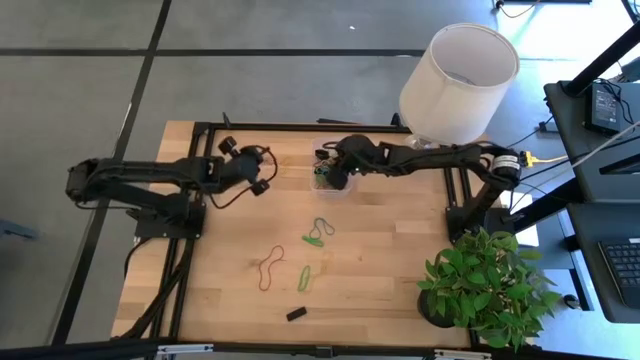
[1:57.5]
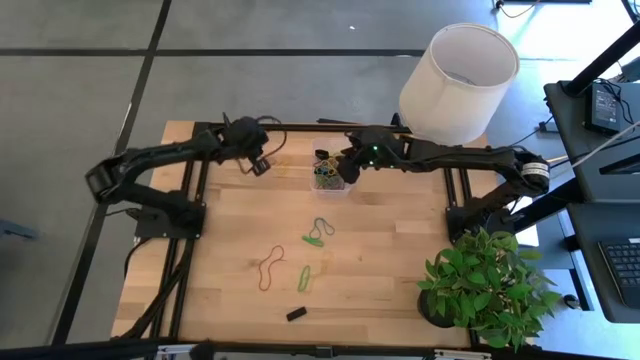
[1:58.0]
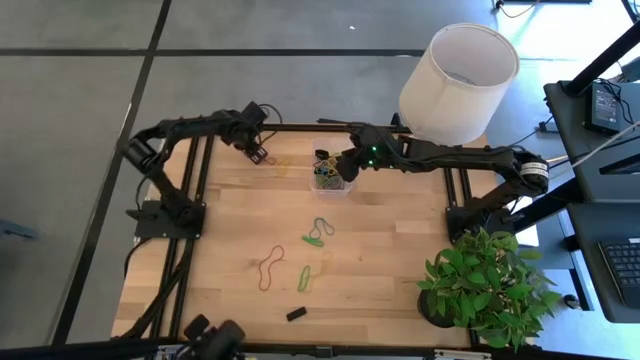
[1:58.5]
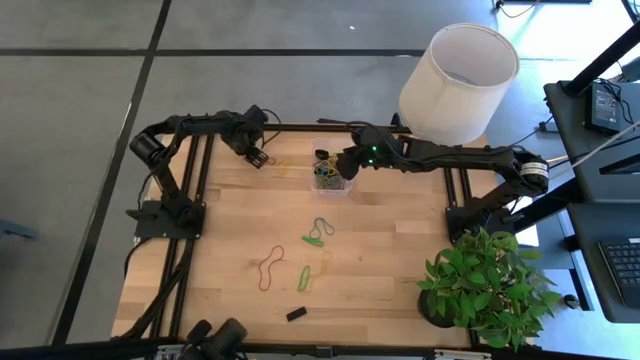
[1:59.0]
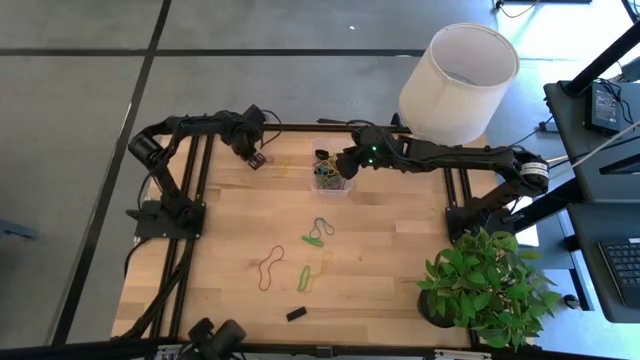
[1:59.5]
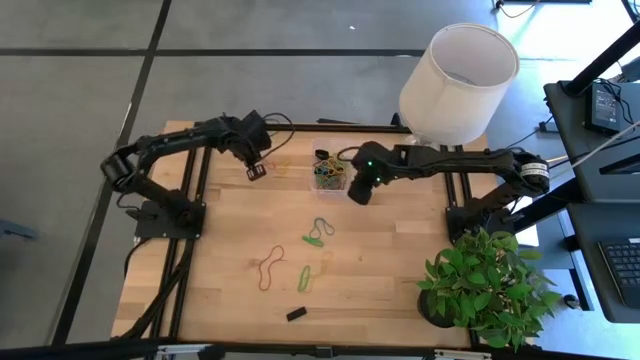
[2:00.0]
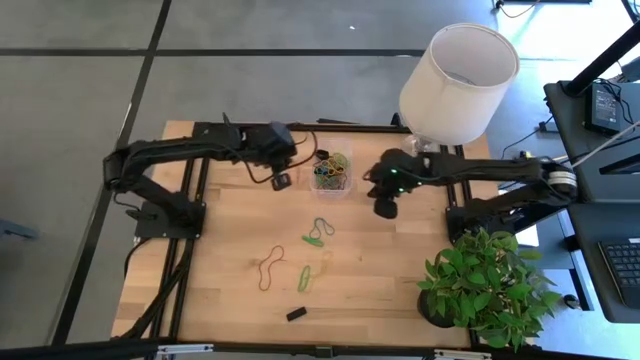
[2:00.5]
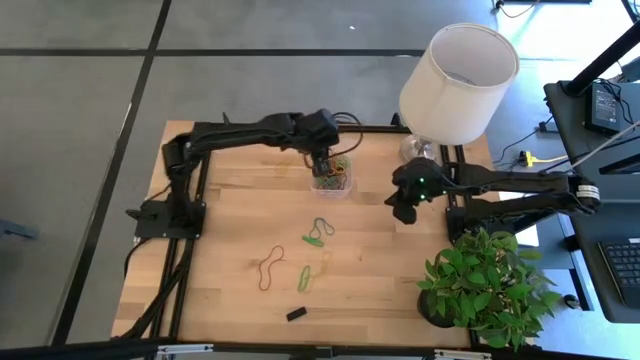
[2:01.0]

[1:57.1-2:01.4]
Task: Pick and place rubber bands into bin
Put the red rubber band into the transparent bin

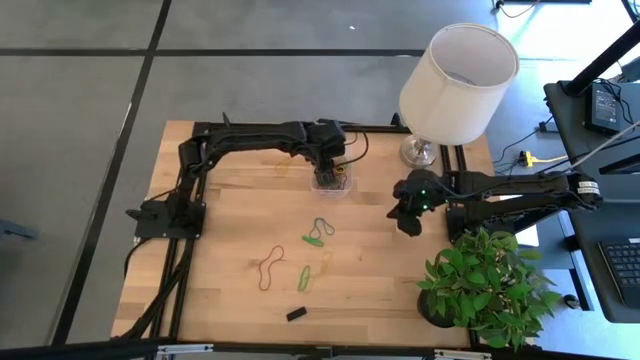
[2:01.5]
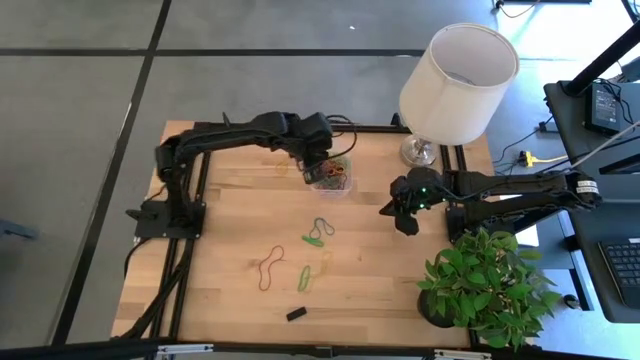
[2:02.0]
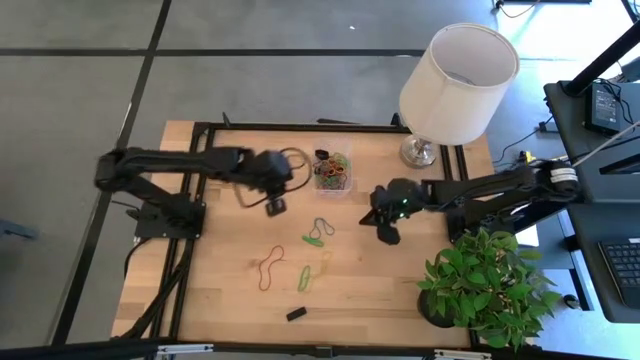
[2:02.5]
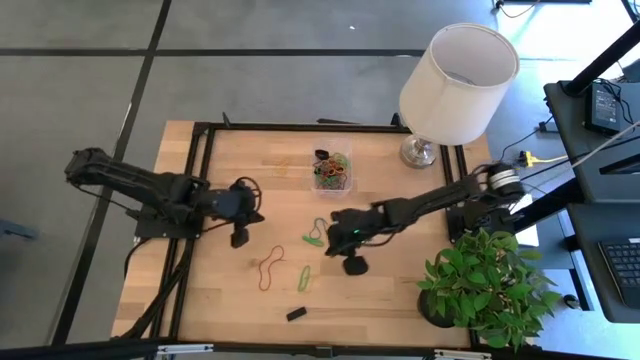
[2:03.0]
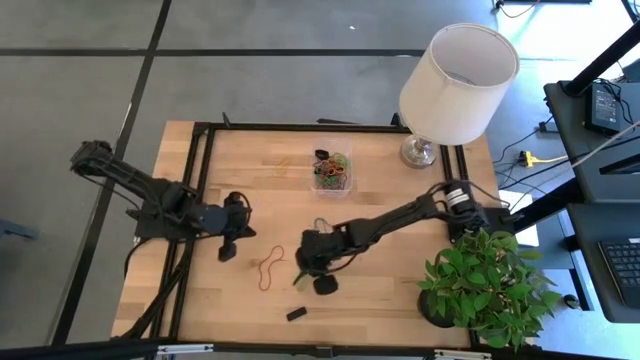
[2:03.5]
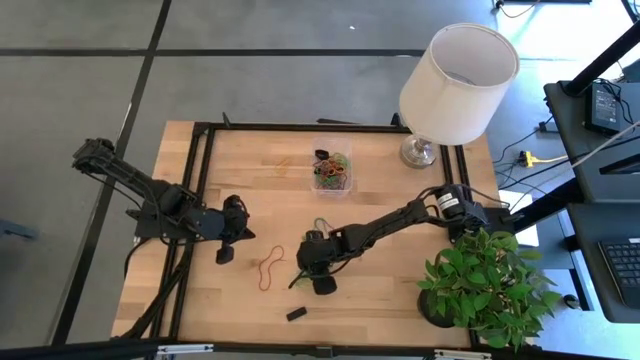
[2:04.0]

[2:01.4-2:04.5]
Put the green rubber band into the transparent bin

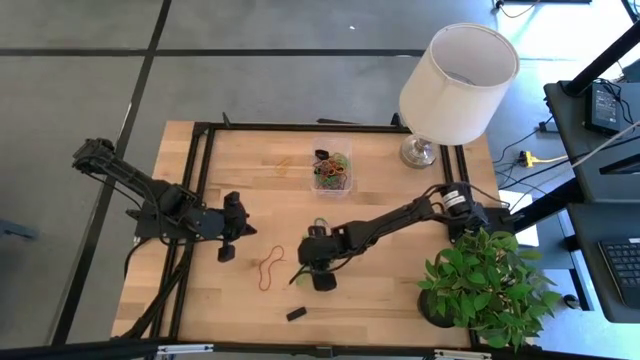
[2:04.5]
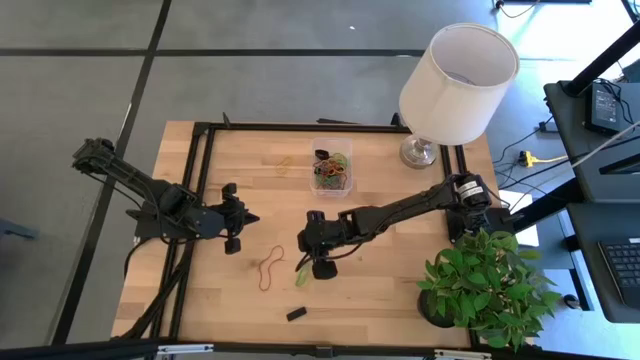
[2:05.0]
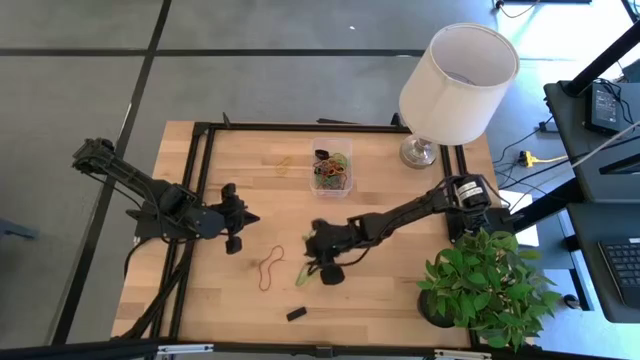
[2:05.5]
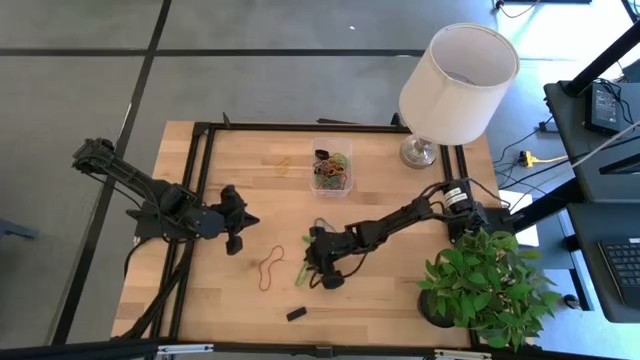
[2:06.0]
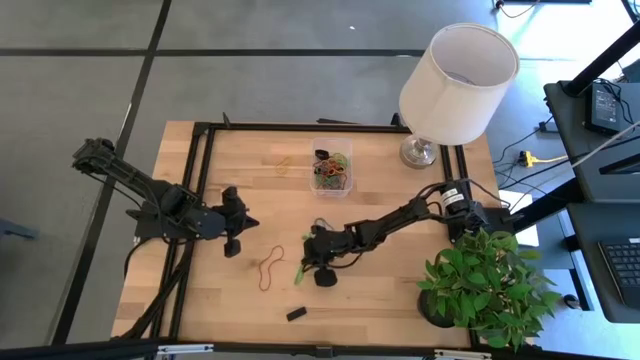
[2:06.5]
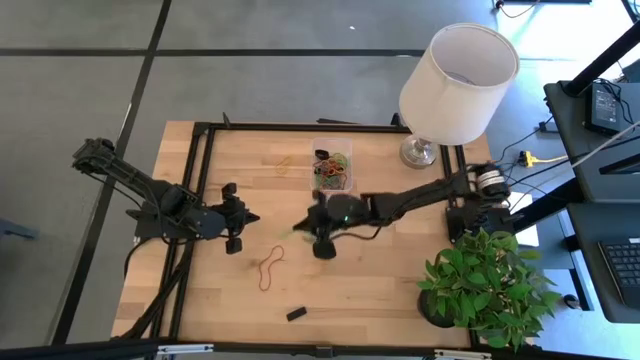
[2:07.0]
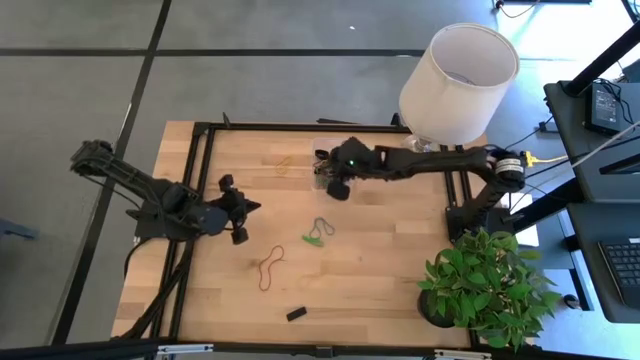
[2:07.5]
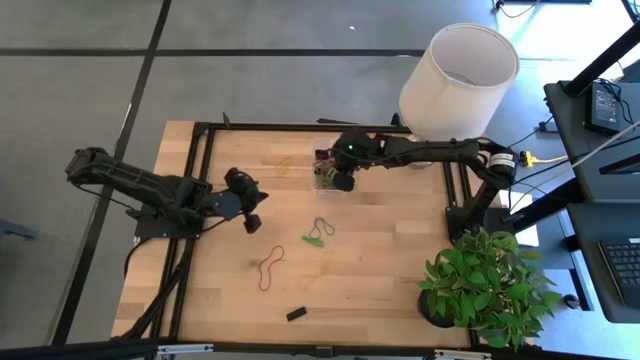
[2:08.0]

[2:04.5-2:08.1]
Put the green rubber band into the transparent bin

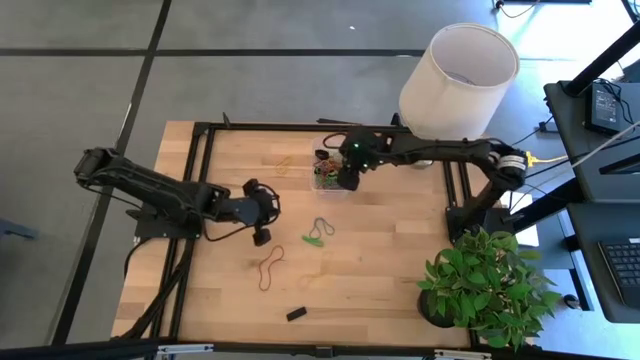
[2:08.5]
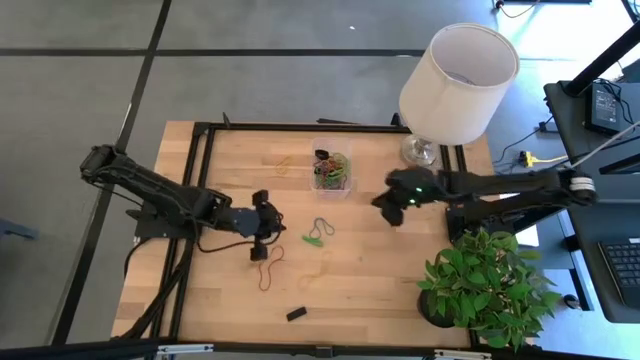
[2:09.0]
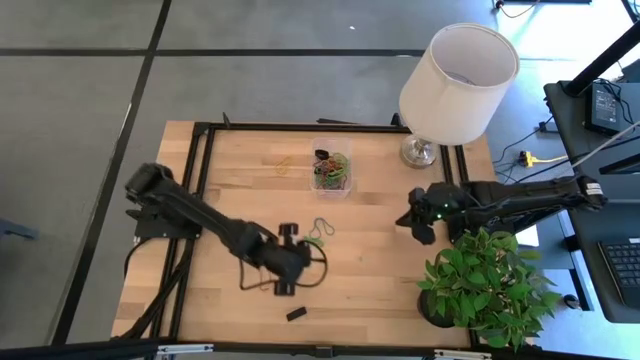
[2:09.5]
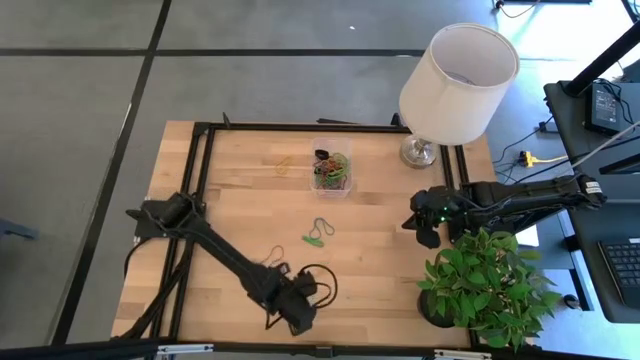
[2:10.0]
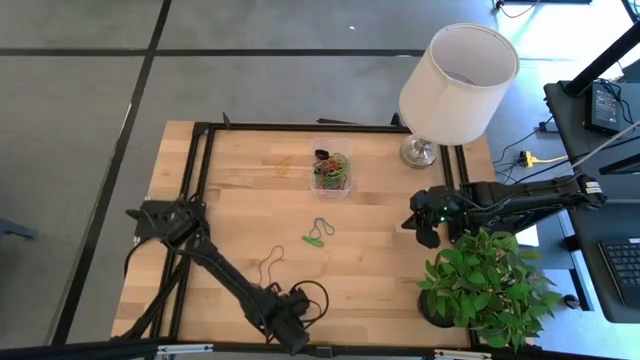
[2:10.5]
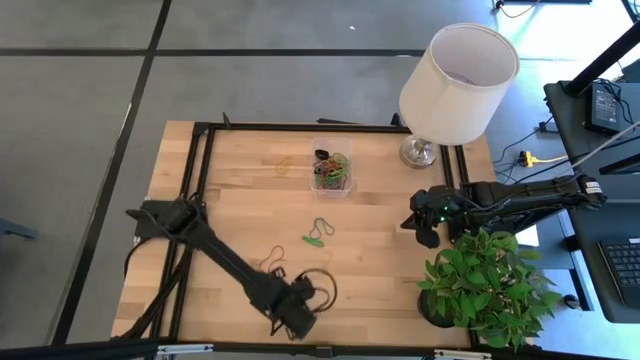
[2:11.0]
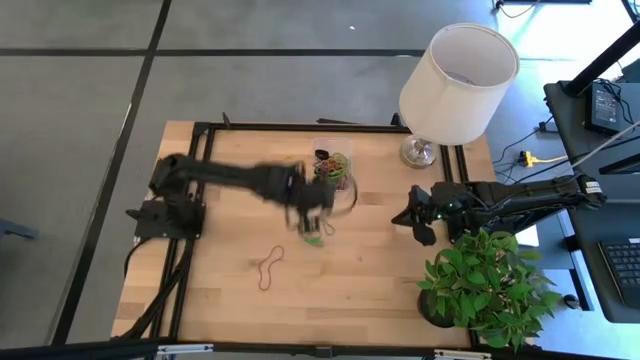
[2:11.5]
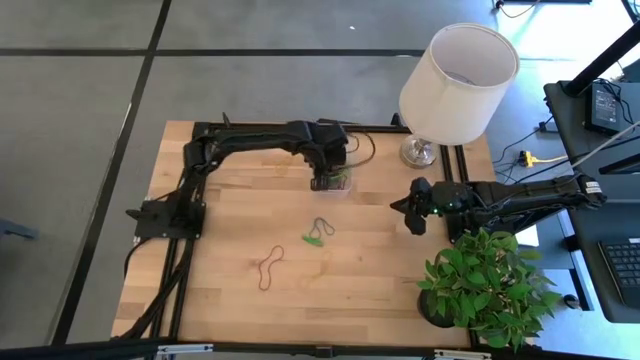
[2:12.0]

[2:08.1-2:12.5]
Put the black rubber band into the transparent bin

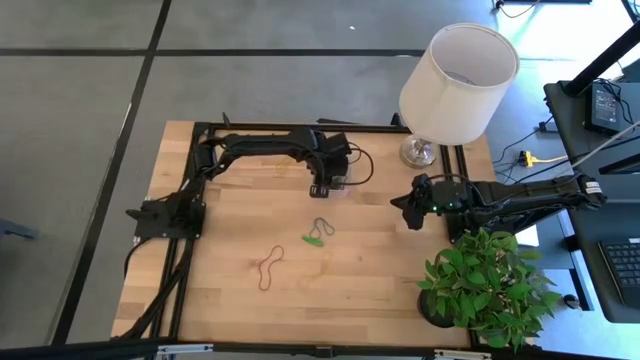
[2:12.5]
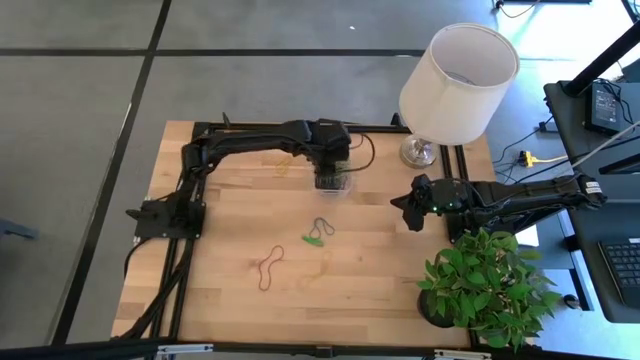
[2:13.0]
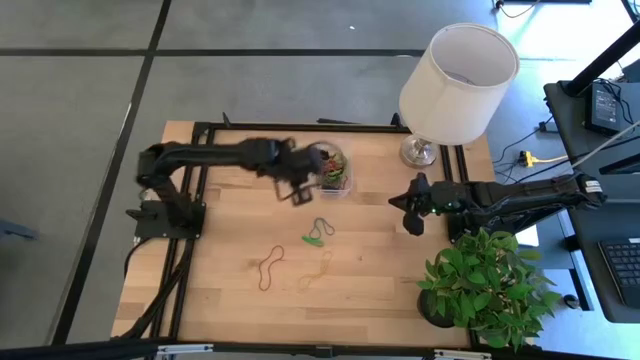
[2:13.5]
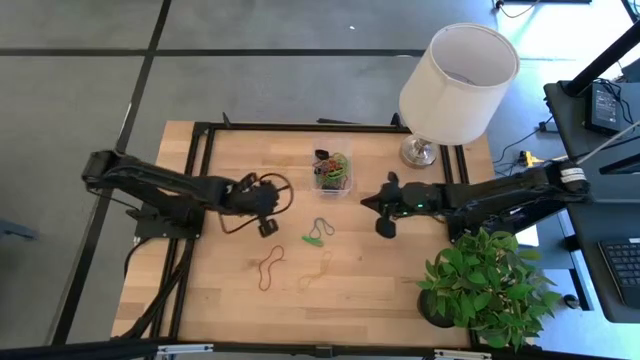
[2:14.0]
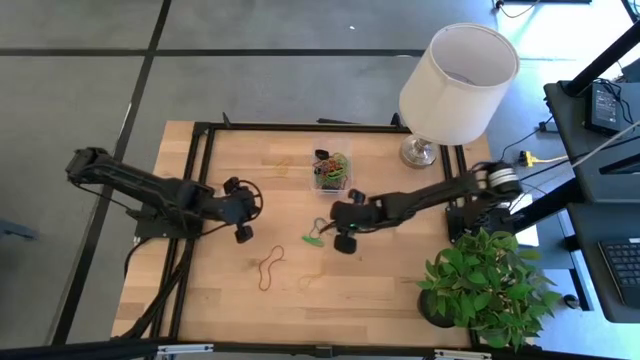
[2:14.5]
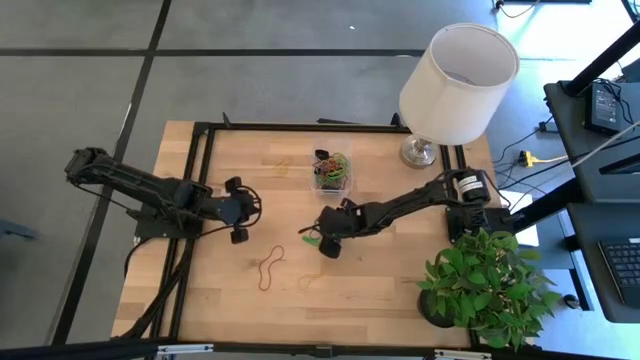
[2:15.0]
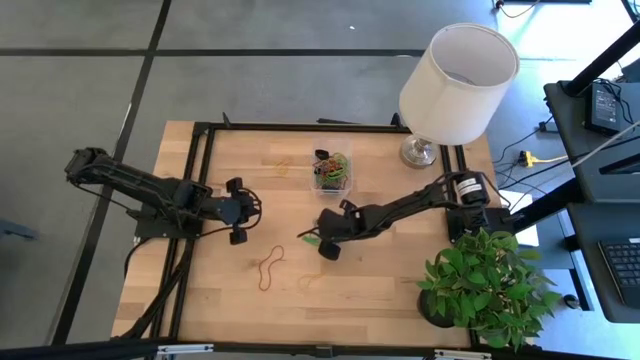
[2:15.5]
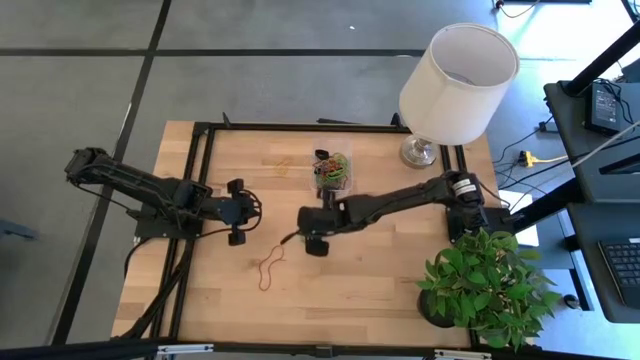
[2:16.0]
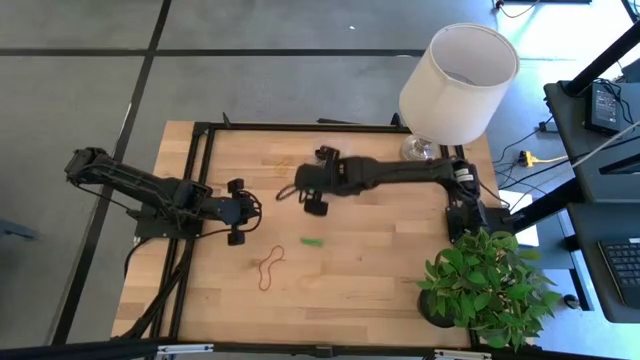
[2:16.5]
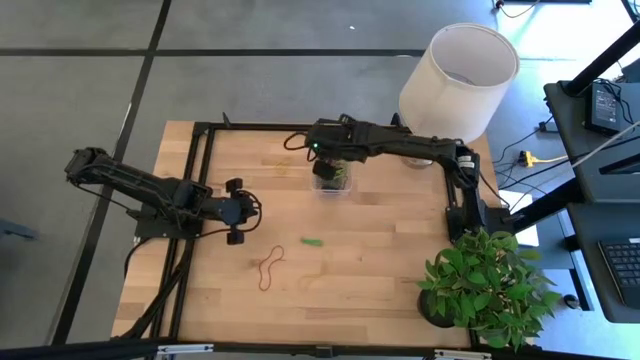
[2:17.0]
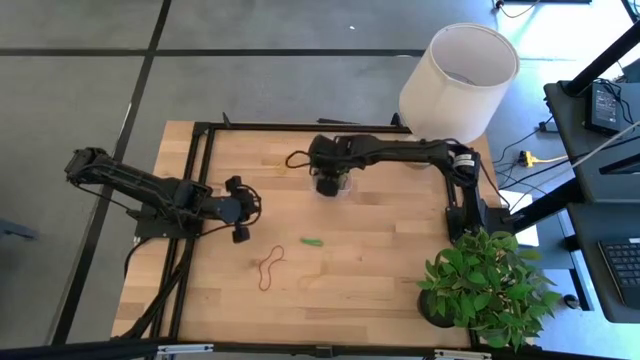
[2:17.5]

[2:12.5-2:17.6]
Put the blue rubber band into the transparent bin

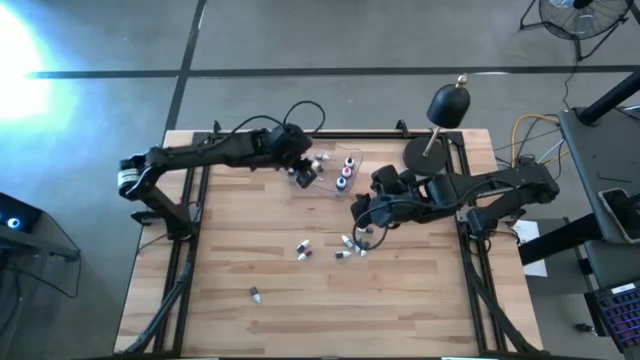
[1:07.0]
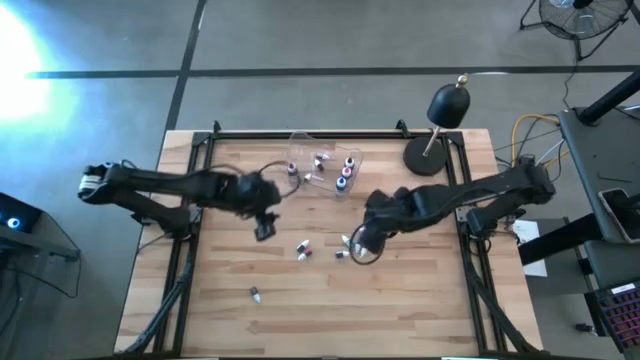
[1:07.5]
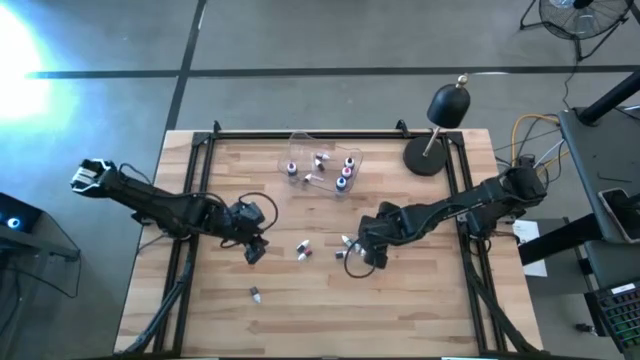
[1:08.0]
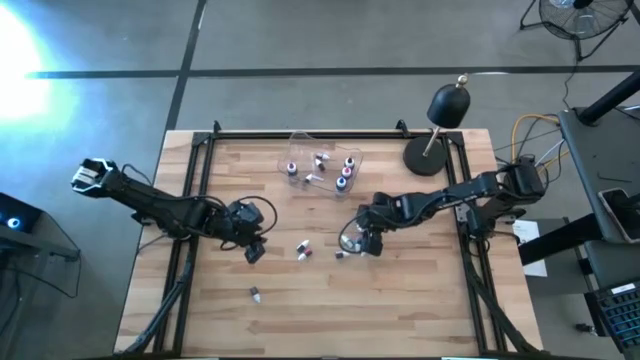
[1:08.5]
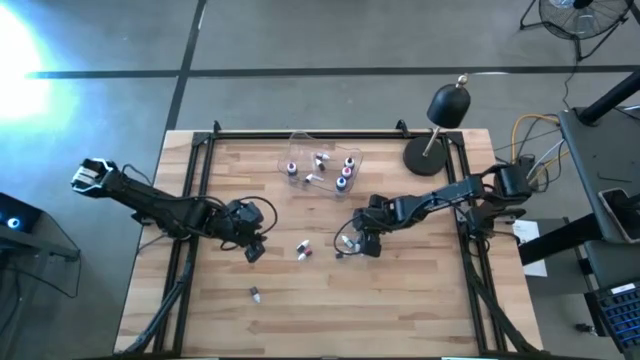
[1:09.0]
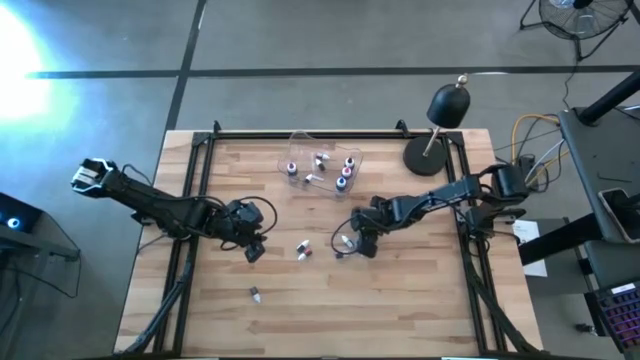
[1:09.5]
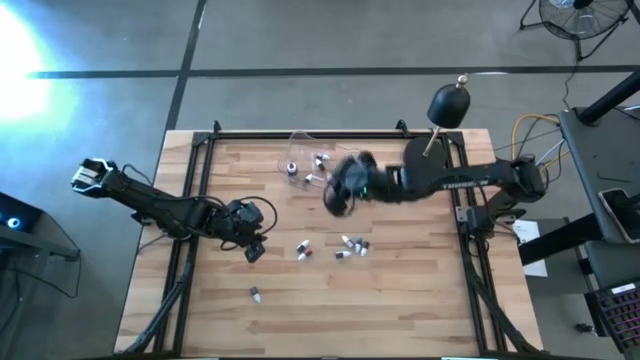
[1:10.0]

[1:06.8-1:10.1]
Task: Pick & Place food coloring
Put the top small red food coloring bottle into the transparent bin
